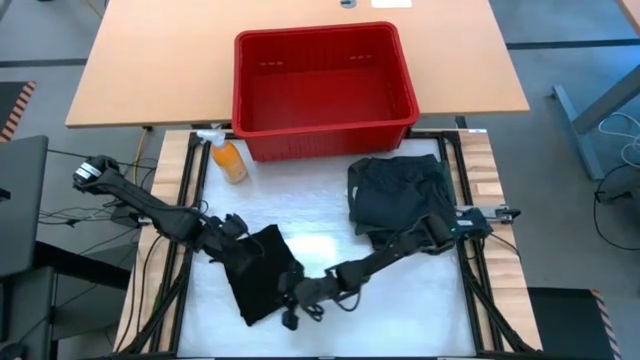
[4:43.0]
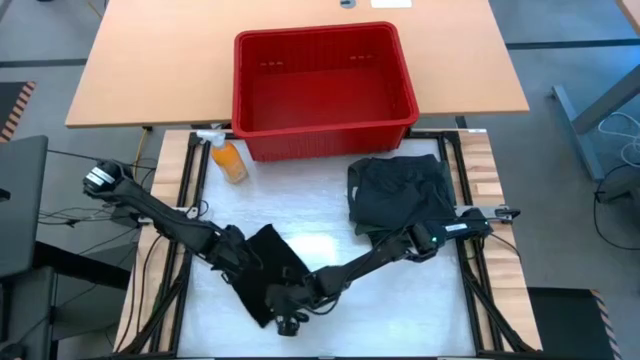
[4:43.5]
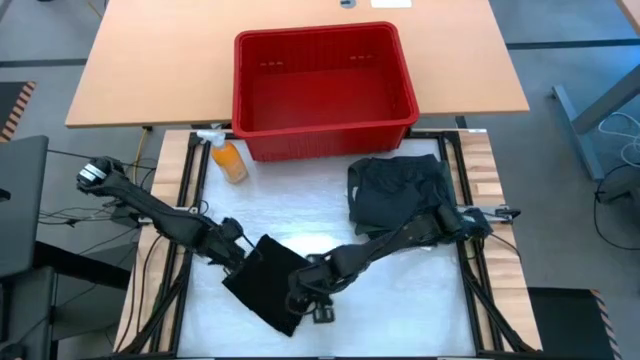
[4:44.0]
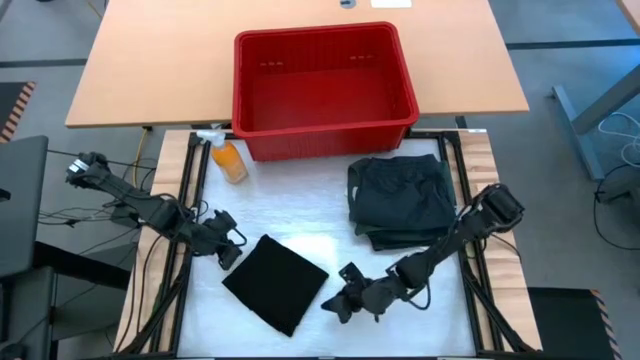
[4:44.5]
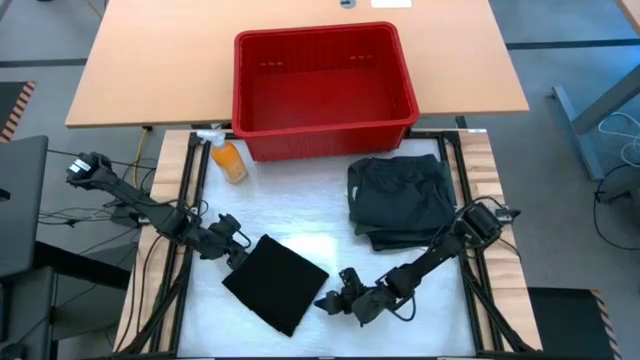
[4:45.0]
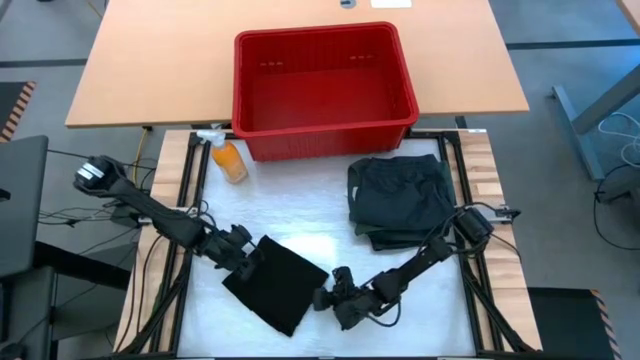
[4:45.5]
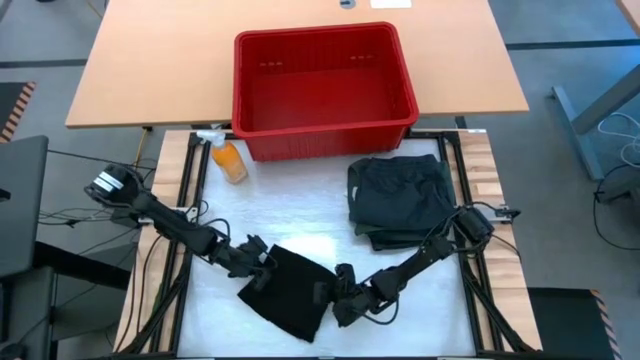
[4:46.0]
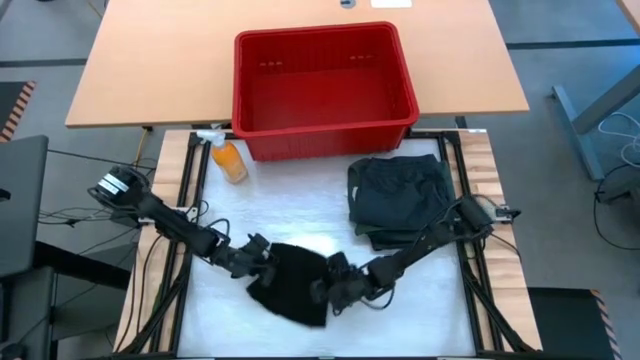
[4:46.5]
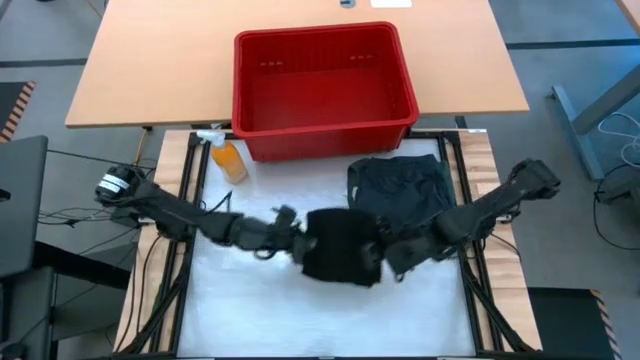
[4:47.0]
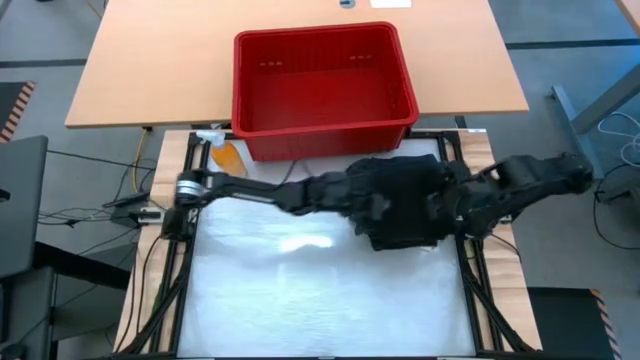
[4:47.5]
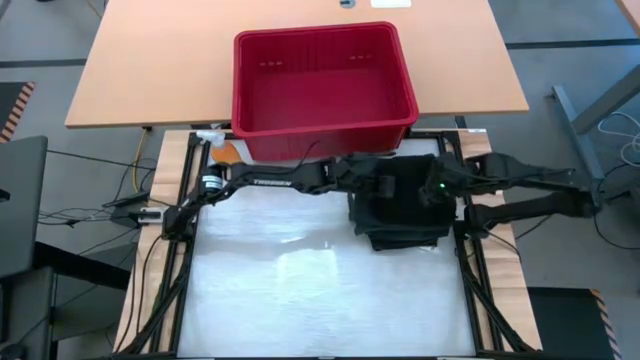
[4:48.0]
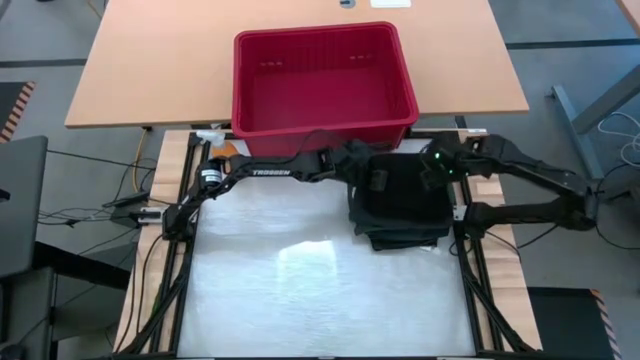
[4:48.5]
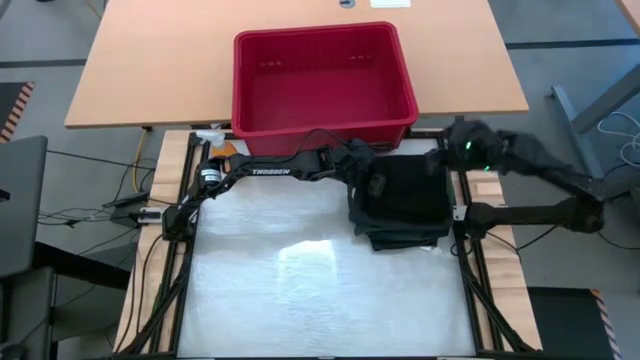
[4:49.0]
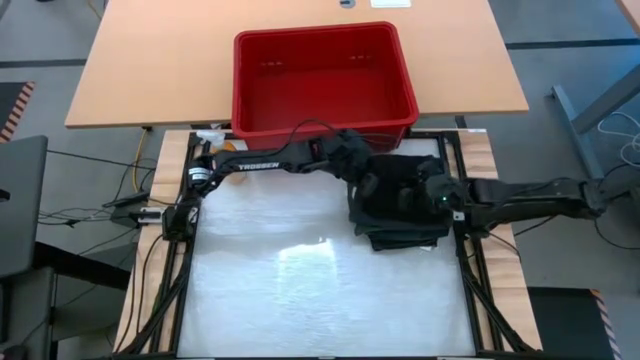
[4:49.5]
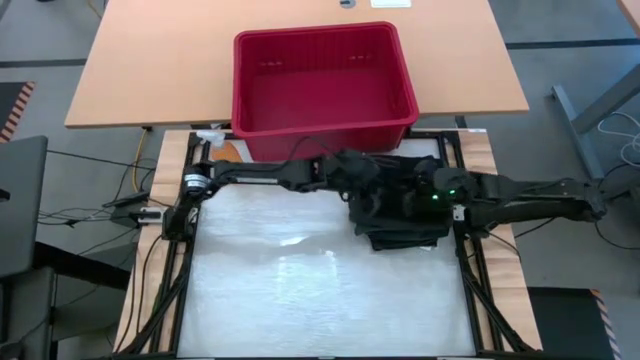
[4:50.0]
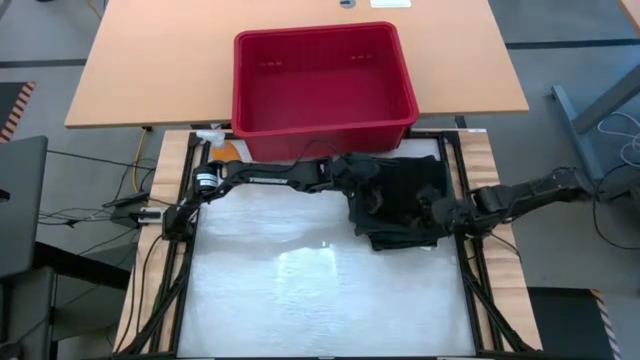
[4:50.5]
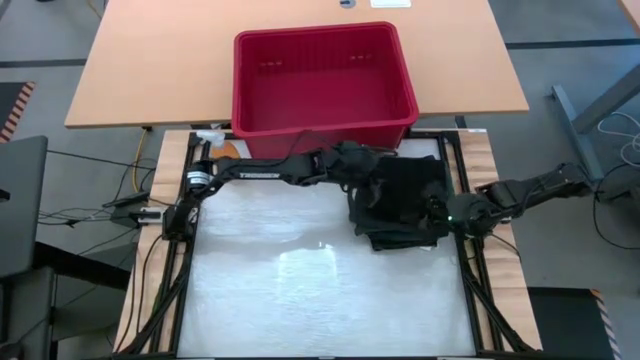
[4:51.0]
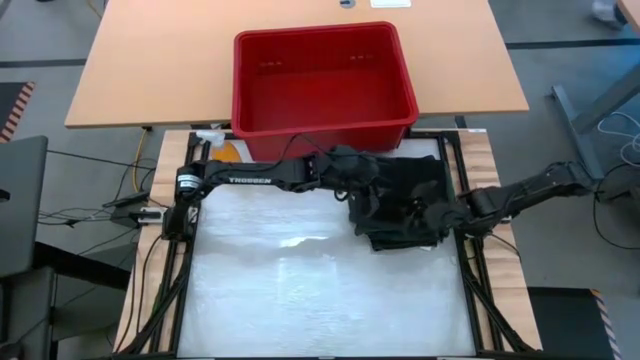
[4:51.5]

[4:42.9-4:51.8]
Task: Fold Laundry from Bin
Stack the black shirt on top of the black short

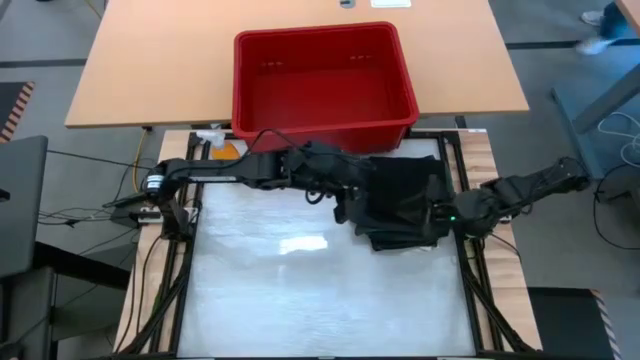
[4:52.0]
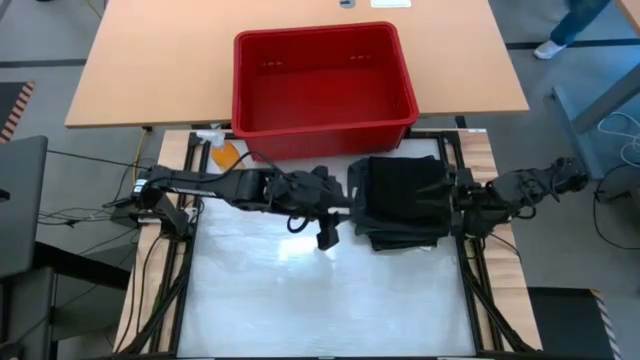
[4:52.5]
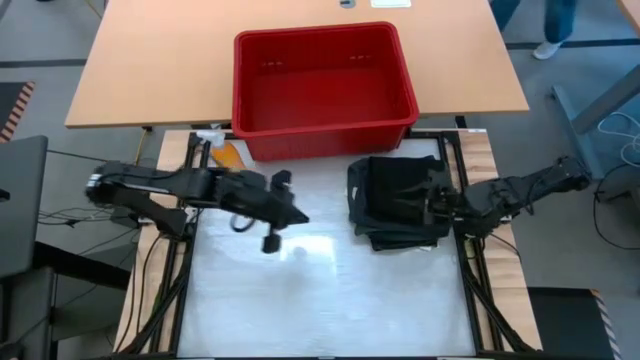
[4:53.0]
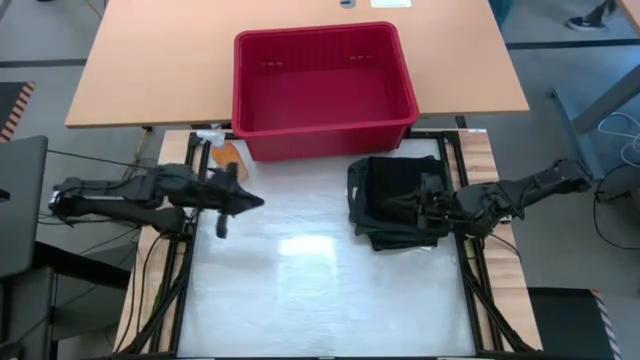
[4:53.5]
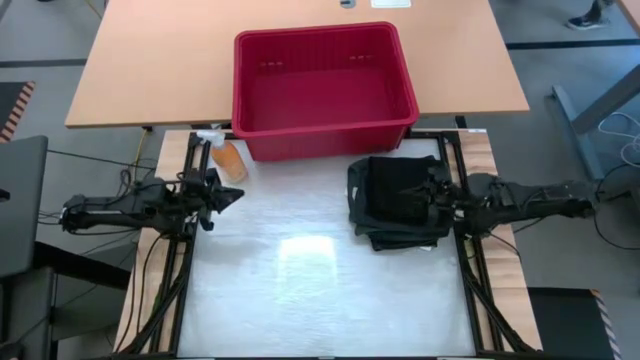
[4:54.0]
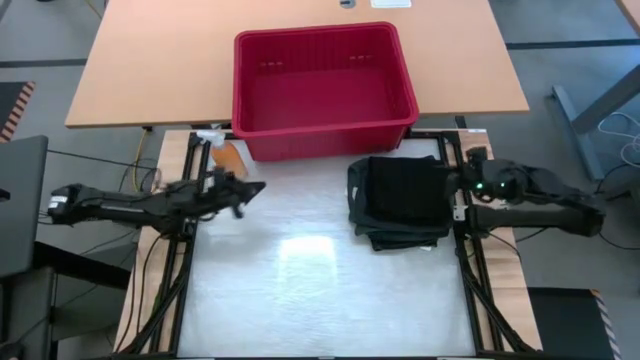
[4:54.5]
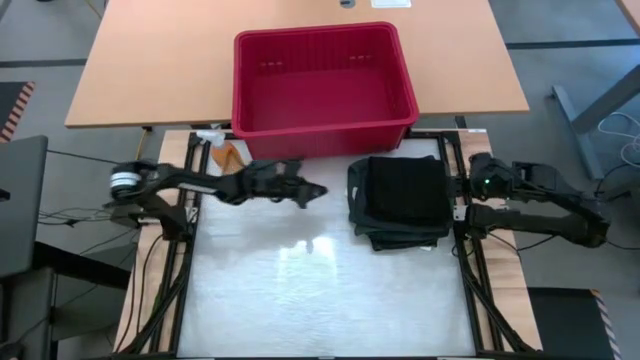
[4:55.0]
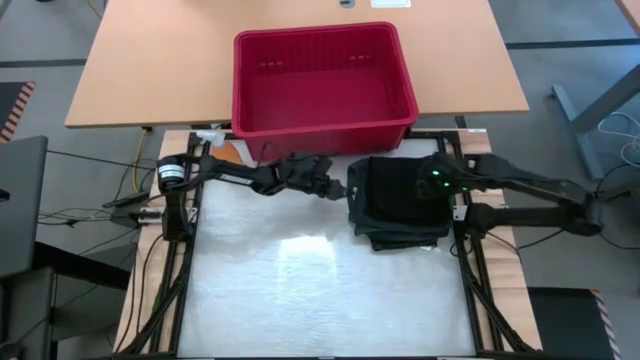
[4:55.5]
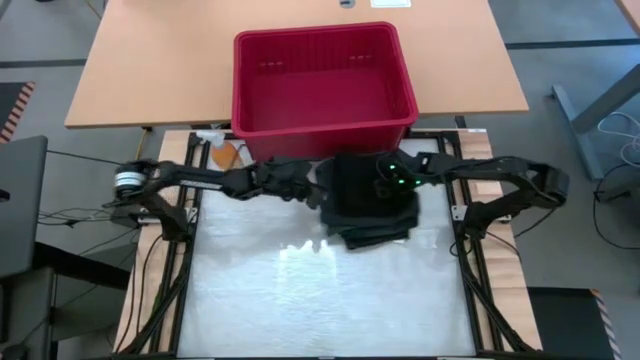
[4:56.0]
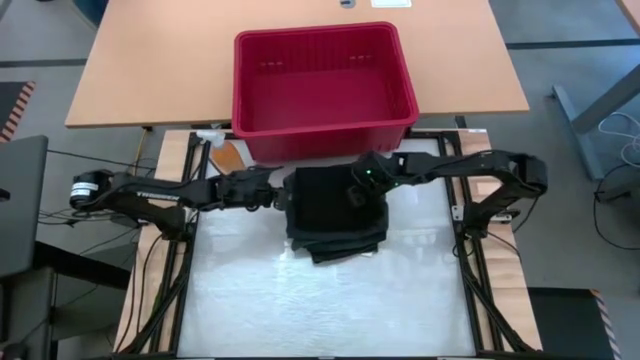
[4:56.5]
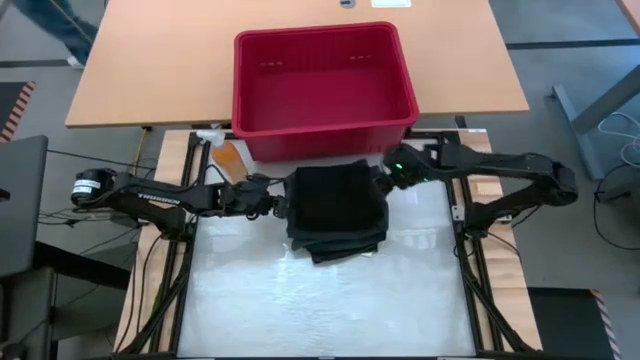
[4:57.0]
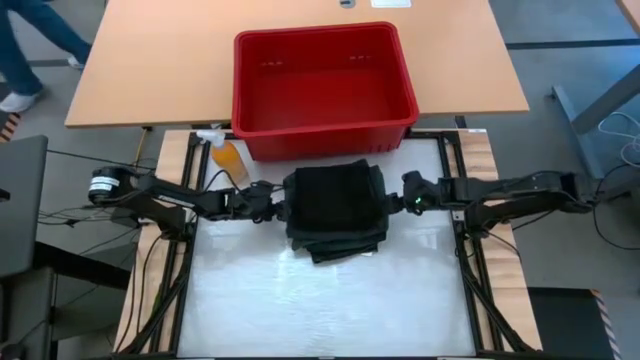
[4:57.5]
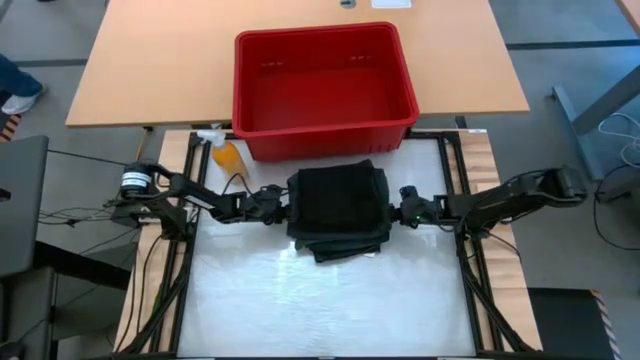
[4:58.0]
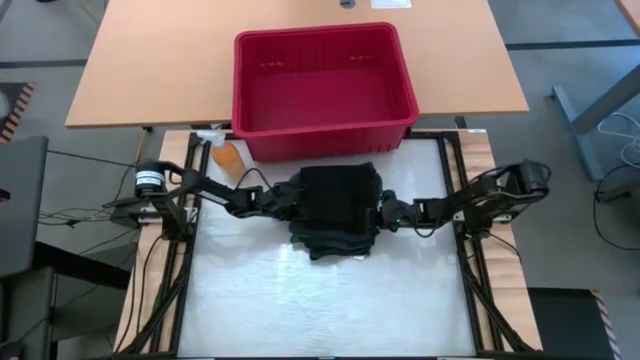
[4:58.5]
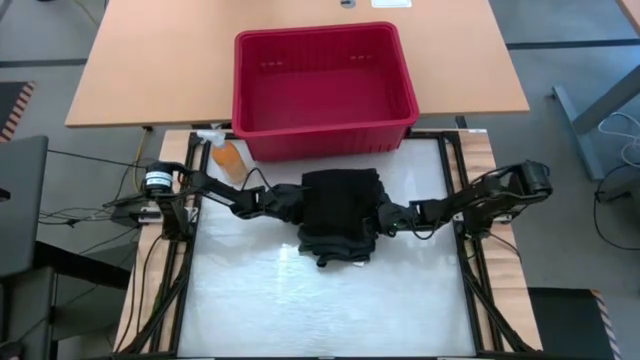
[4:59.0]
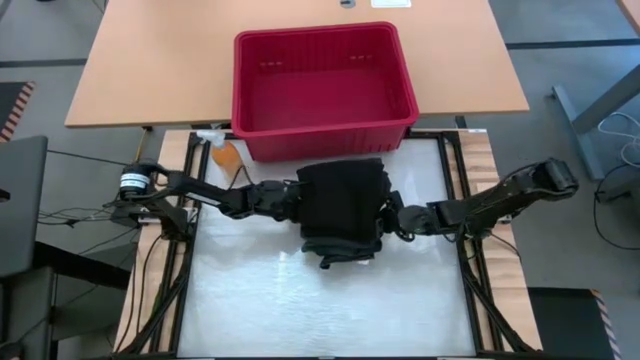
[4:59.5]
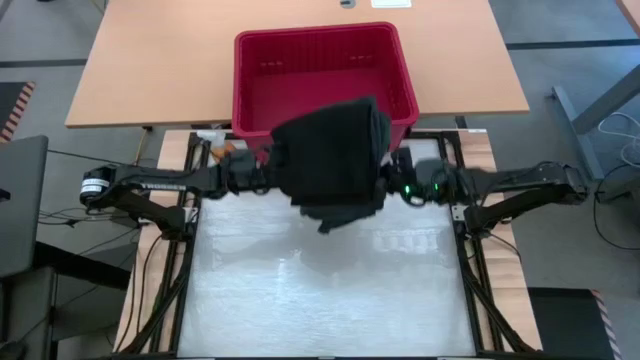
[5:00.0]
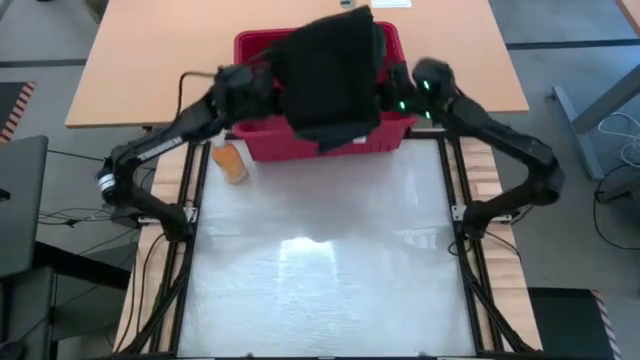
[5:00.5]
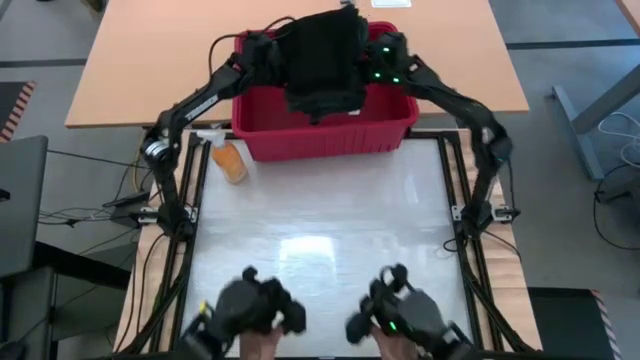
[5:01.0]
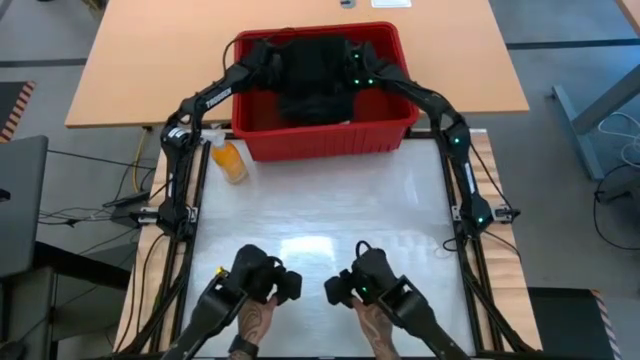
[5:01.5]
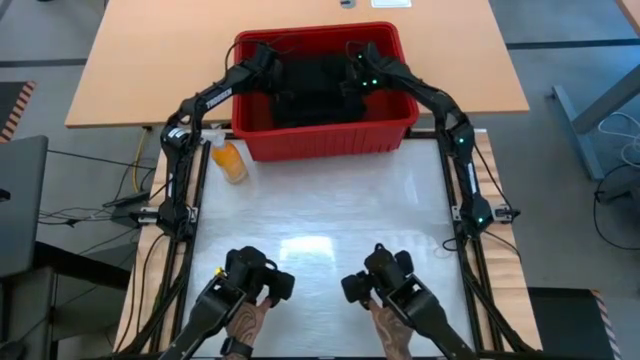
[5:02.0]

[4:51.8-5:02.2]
Put the stacked clothes into the red bin

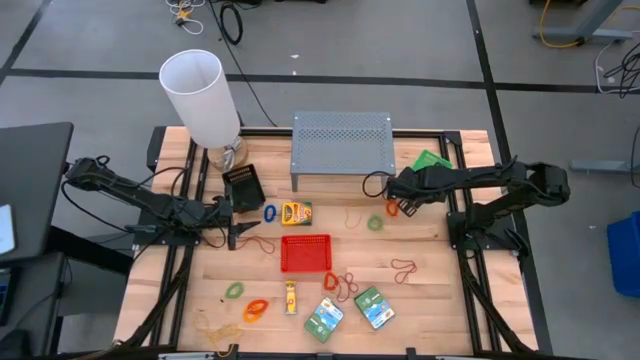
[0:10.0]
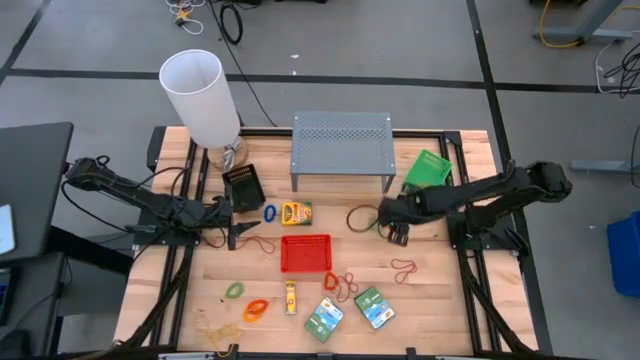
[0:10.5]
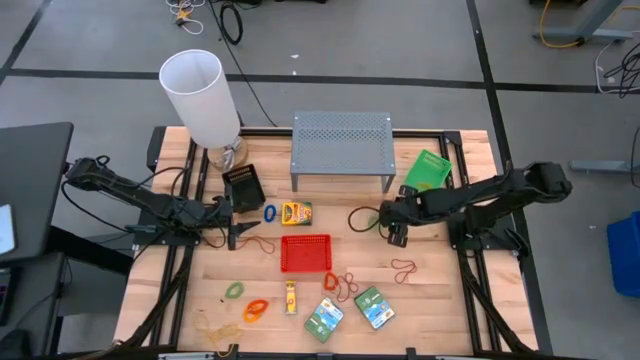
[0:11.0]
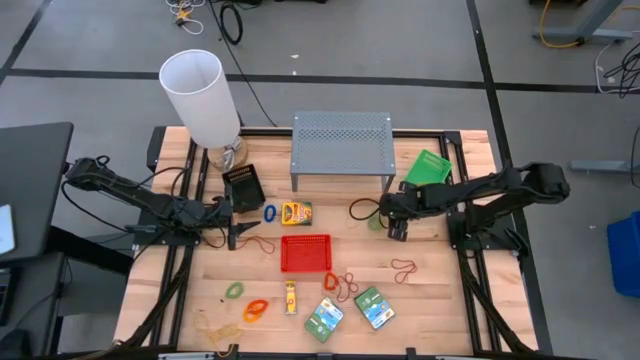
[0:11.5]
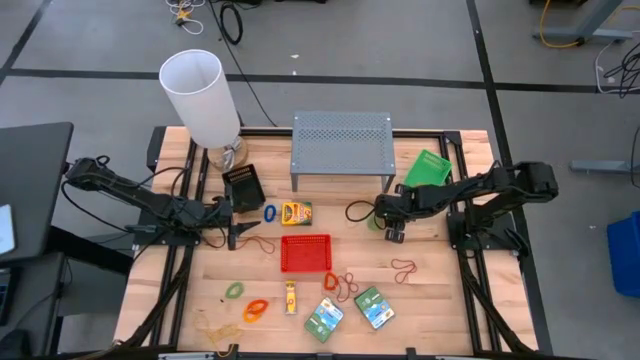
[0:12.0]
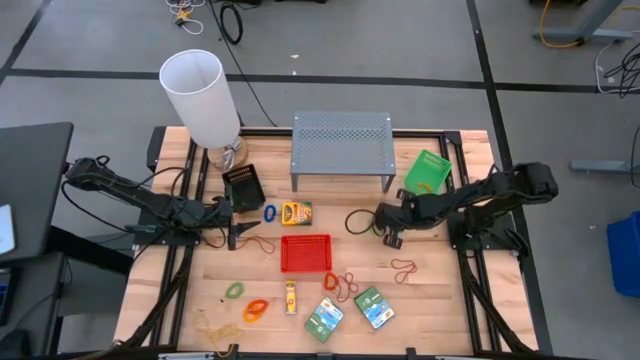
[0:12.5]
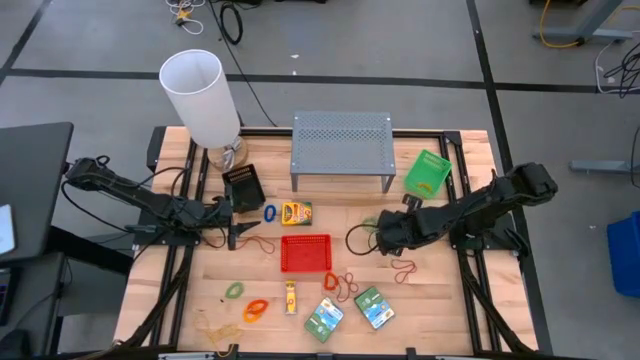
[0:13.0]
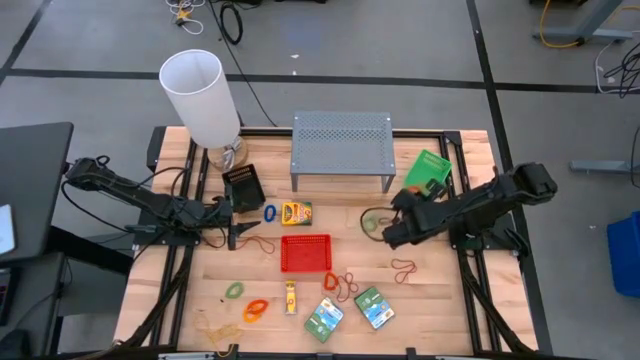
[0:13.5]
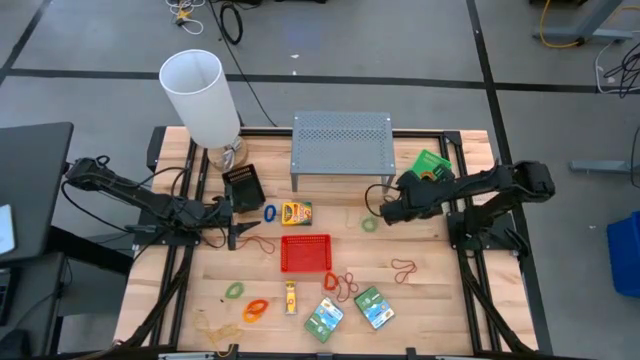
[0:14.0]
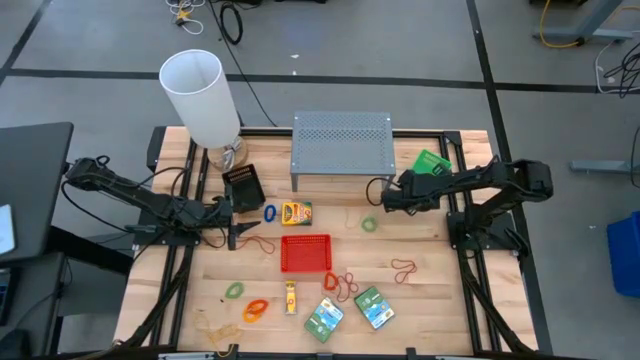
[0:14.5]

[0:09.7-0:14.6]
Task: Pick & Place Office Desk Supplies
Put the orange spring keychain into the green bin
